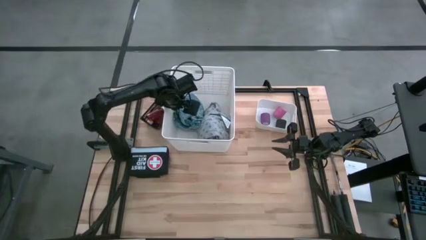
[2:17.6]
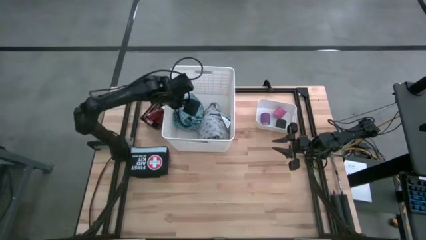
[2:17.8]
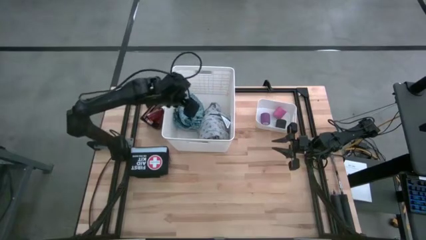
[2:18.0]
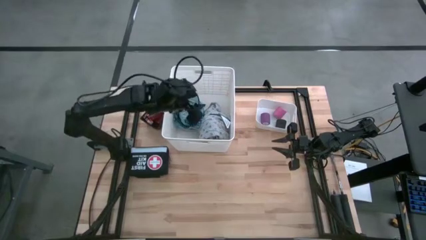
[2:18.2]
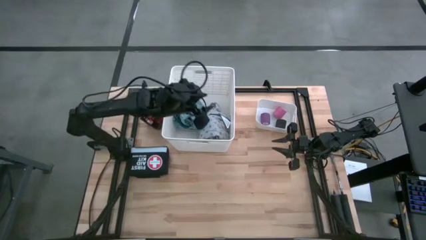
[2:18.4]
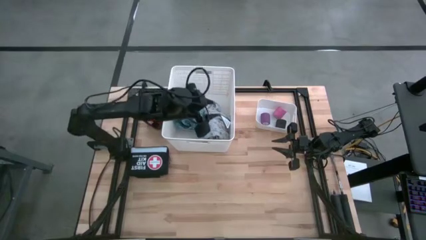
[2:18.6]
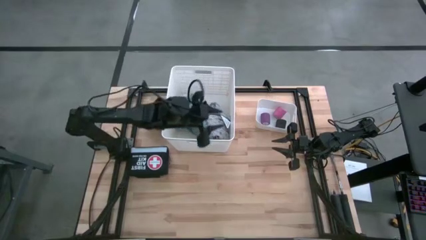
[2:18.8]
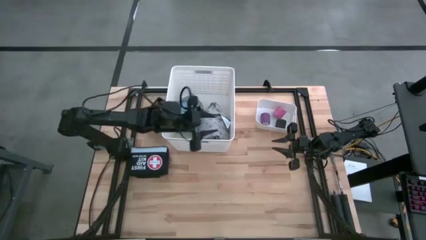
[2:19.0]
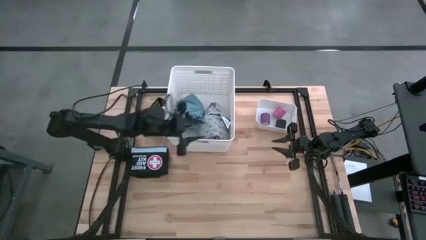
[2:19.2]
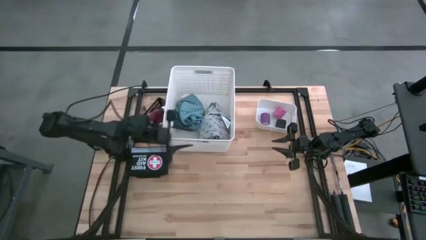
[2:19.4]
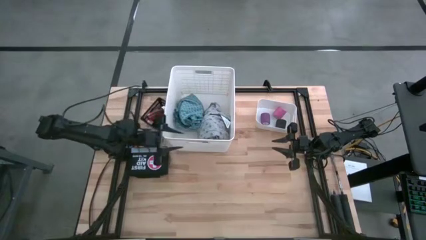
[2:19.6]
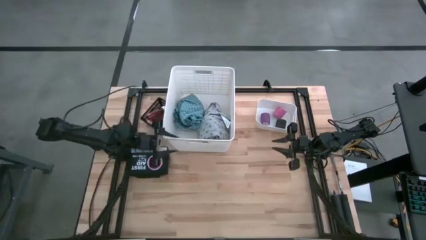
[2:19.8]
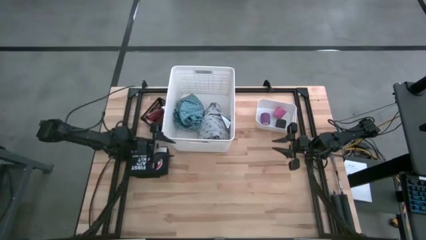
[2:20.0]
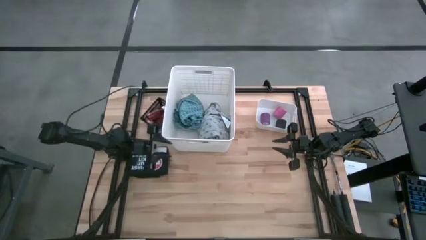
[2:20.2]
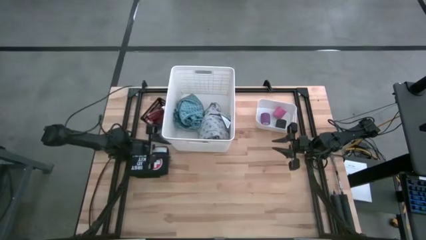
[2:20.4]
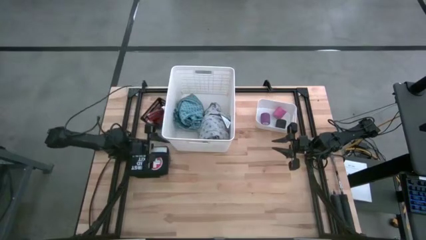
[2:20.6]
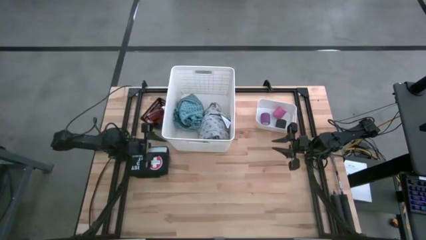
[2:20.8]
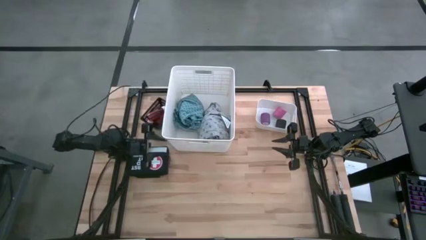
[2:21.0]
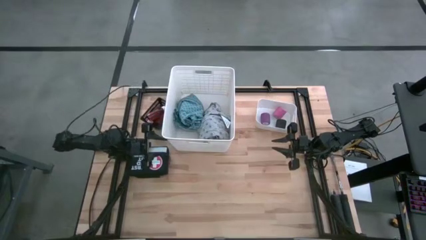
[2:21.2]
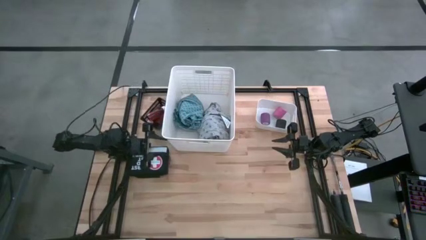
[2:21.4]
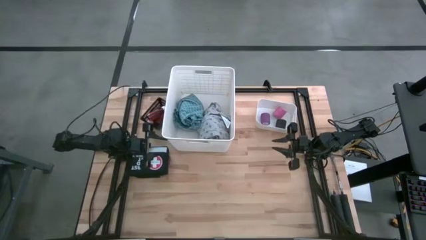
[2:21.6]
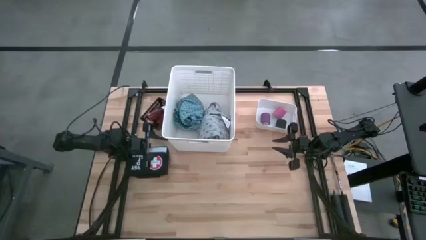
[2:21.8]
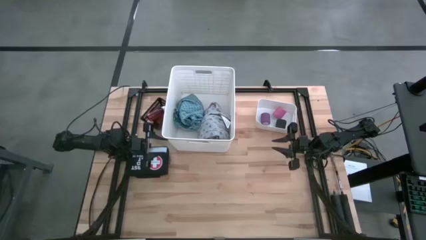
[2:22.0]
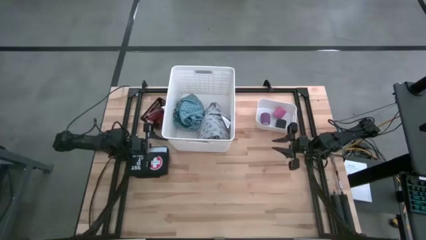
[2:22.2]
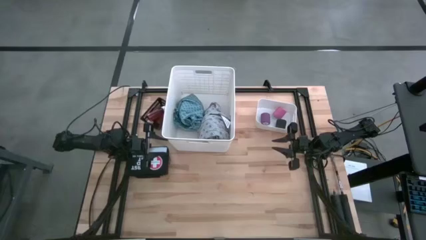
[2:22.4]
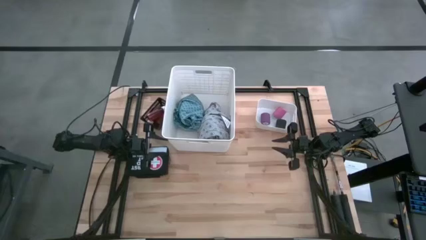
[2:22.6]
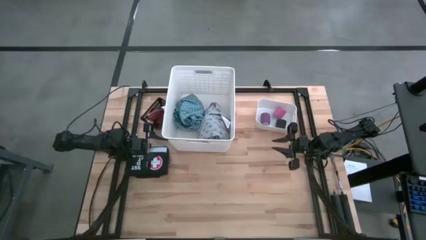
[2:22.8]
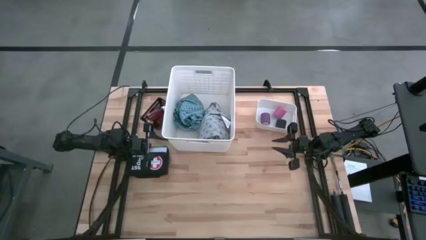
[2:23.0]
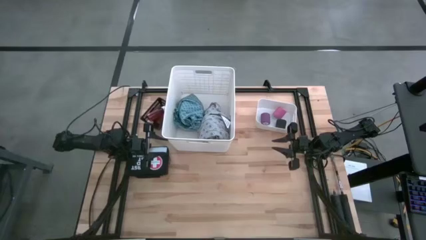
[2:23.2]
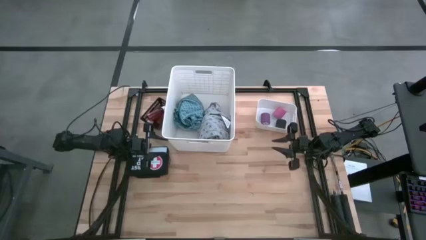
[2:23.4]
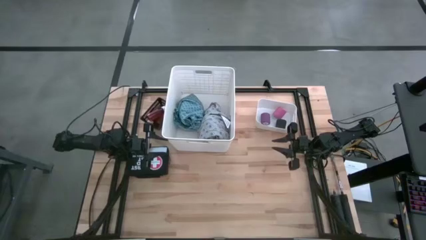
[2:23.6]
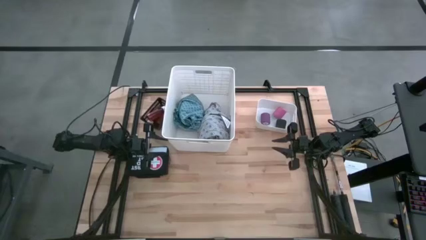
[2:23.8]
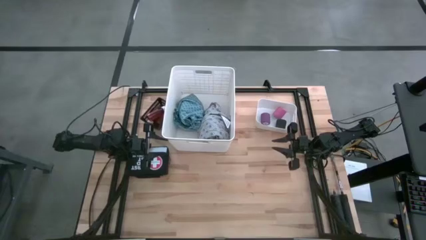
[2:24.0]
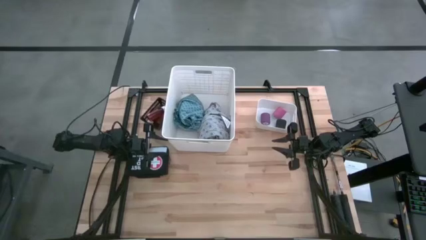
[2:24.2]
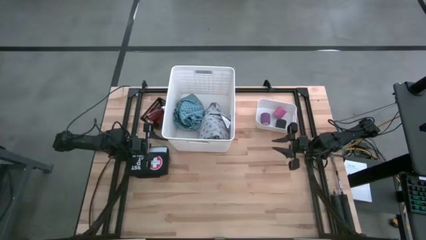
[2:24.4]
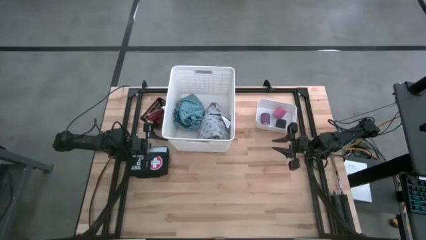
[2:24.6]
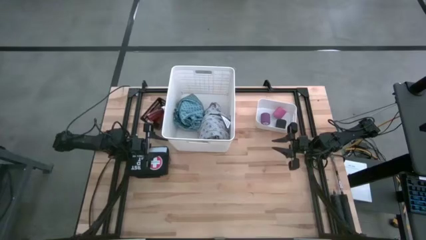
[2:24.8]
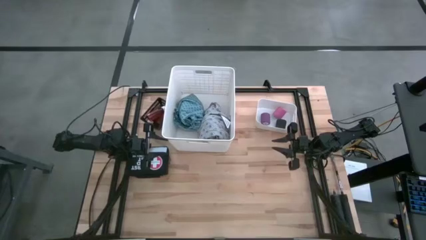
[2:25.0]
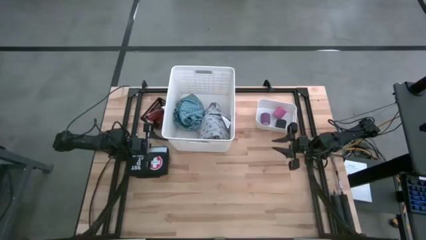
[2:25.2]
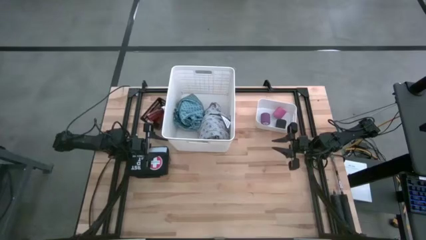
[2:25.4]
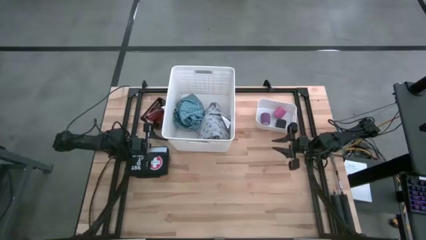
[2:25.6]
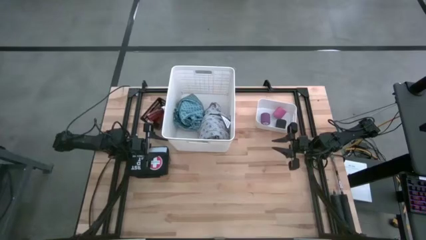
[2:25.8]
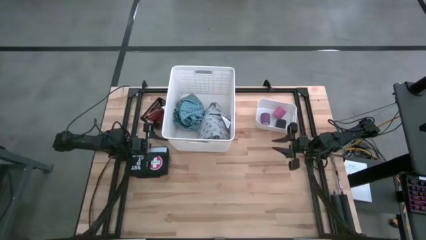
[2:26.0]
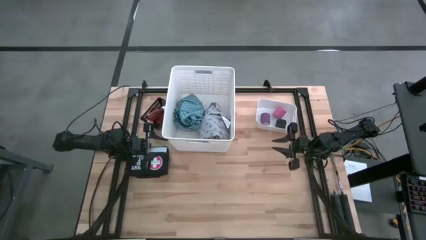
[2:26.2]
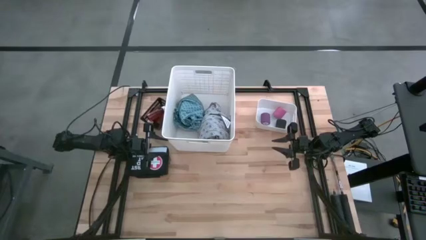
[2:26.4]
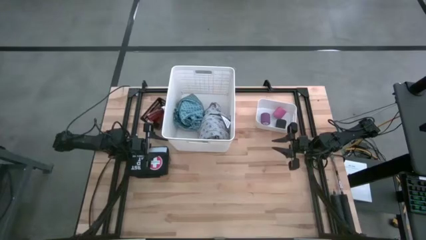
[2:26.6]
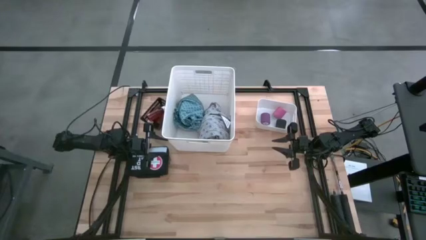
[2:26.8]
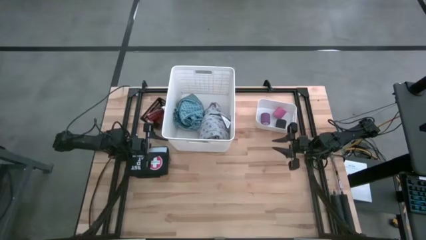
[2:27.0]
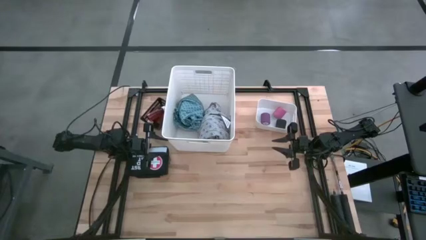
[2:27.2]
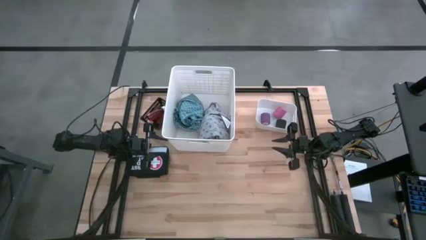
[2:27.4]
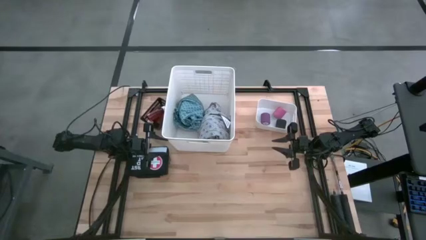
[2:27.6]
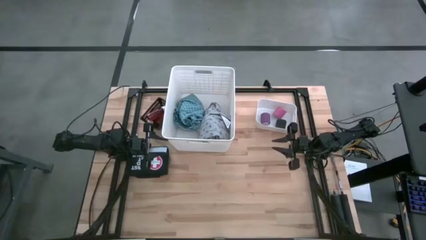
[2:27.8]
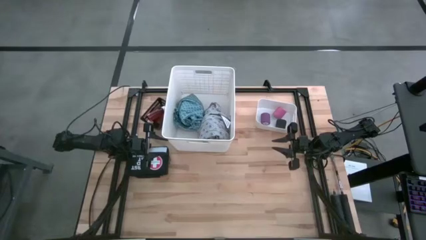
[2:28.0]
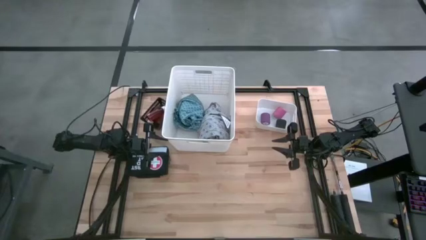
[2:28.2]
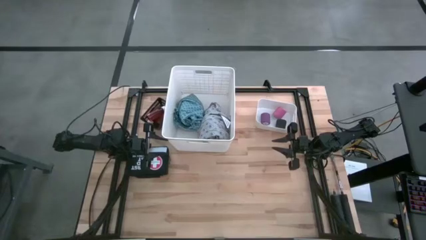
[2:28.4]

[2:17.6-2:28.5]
Task: Pick & Place Medicine items
Return to Home Position
